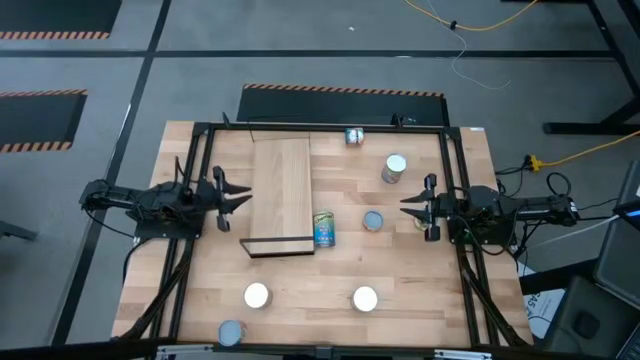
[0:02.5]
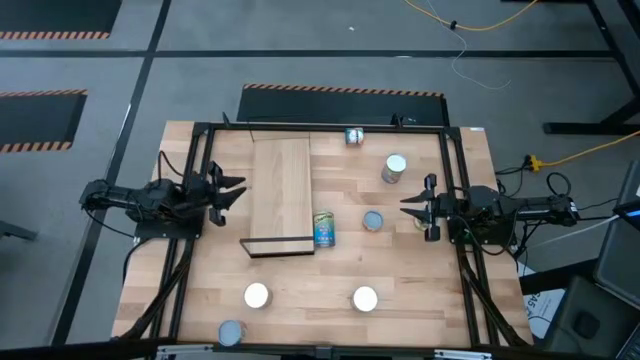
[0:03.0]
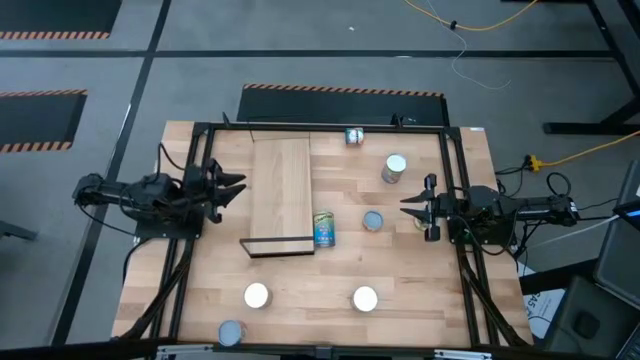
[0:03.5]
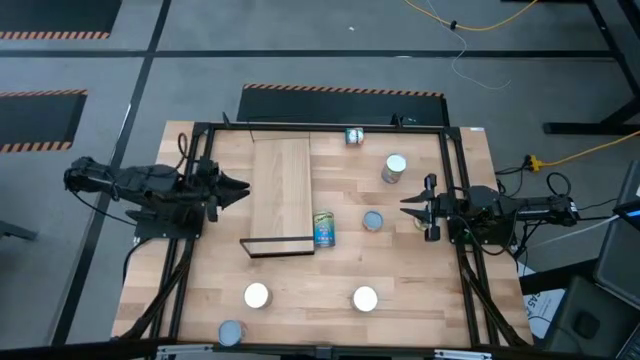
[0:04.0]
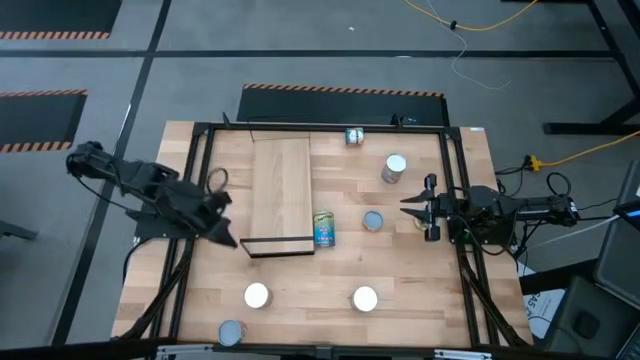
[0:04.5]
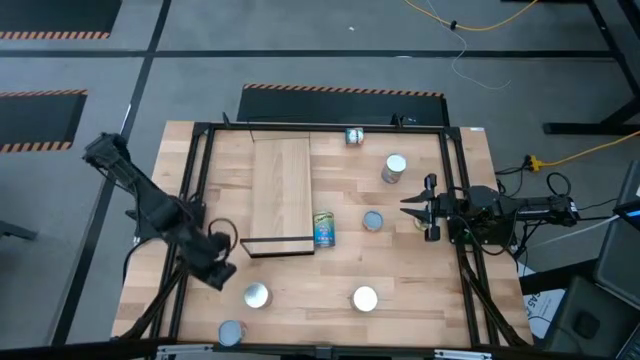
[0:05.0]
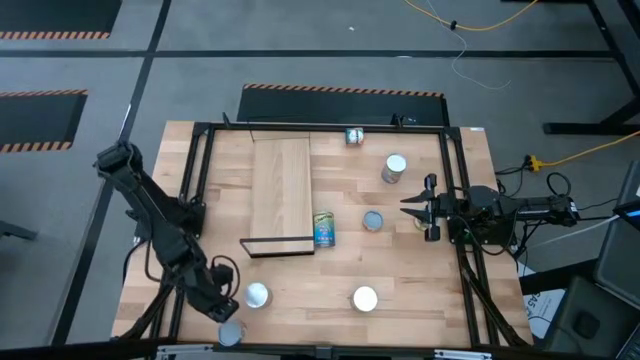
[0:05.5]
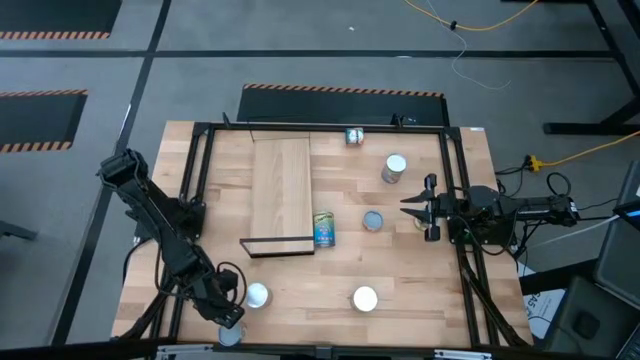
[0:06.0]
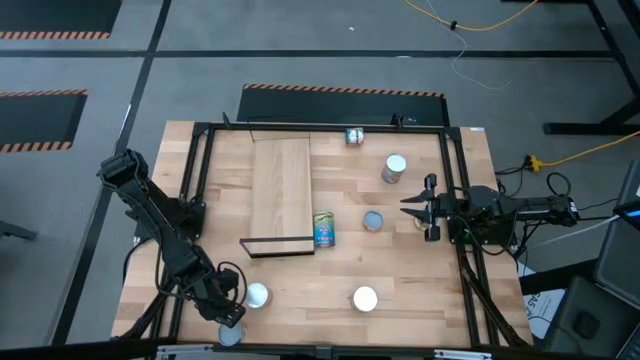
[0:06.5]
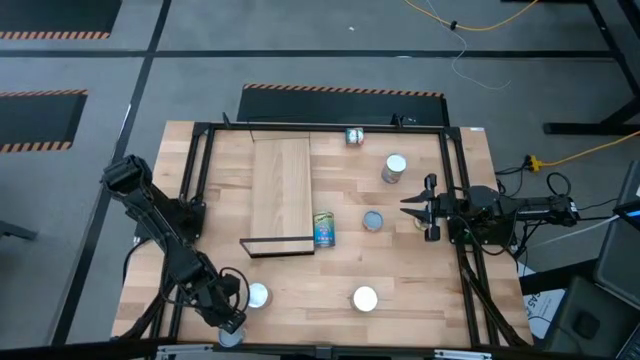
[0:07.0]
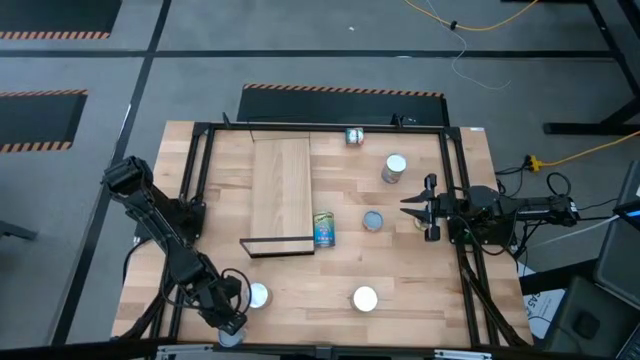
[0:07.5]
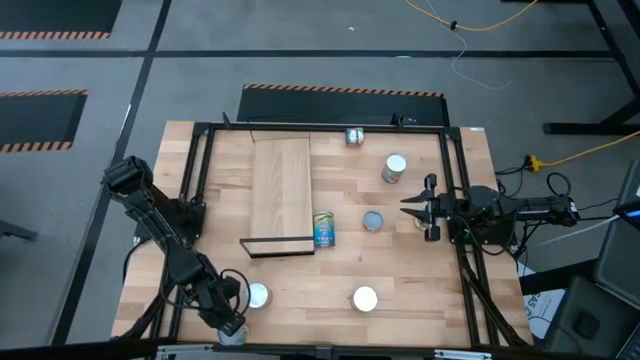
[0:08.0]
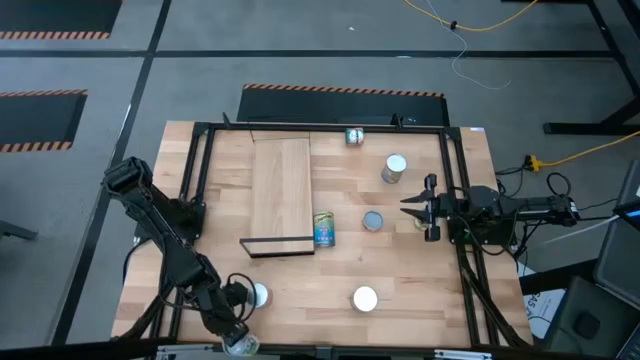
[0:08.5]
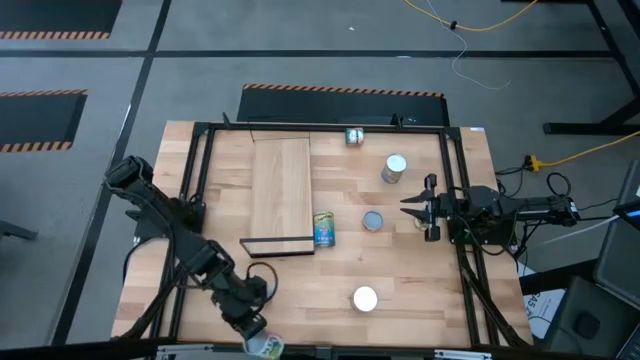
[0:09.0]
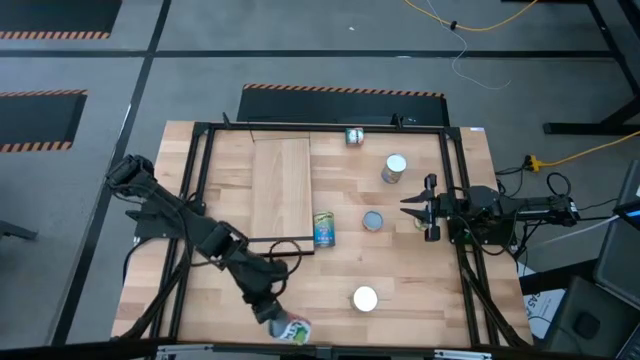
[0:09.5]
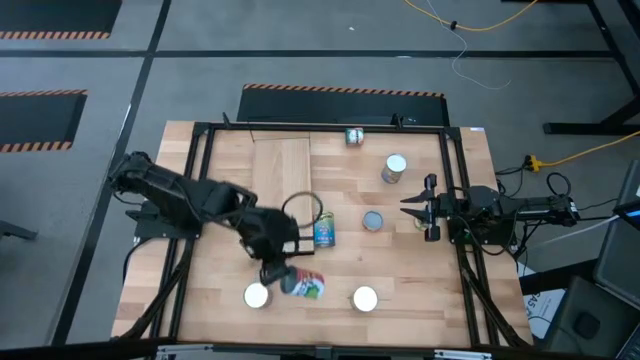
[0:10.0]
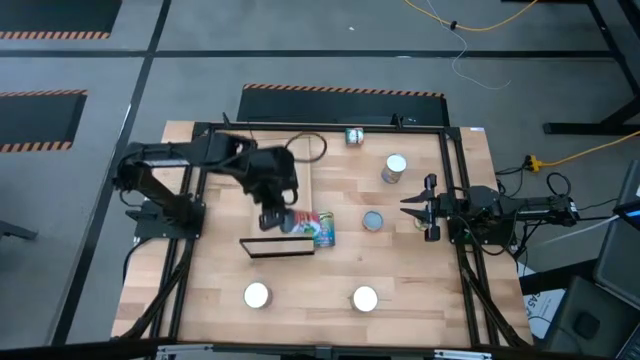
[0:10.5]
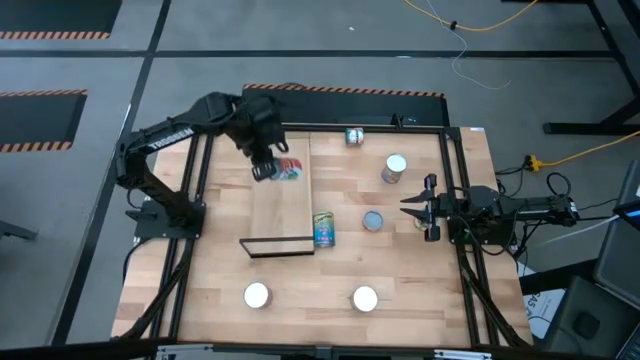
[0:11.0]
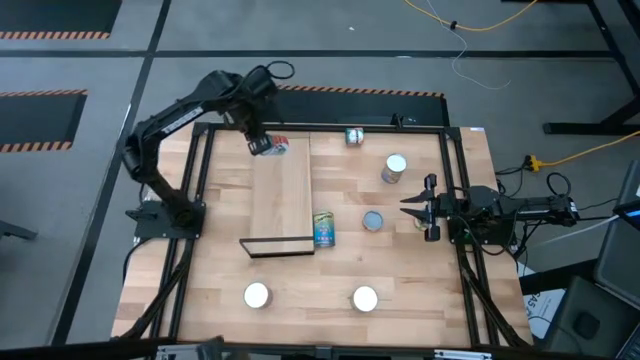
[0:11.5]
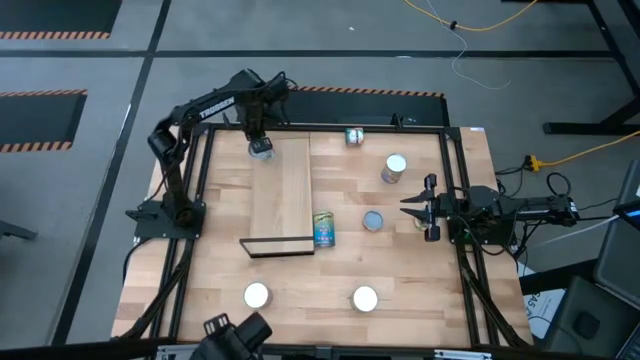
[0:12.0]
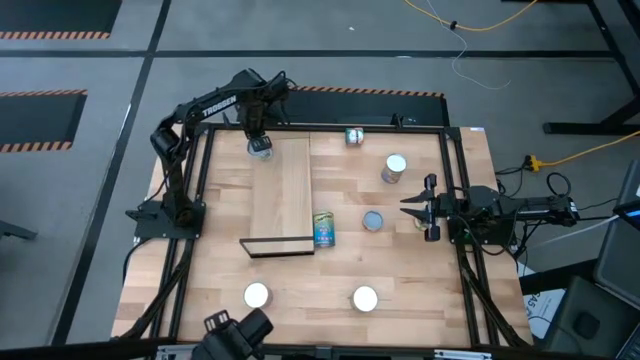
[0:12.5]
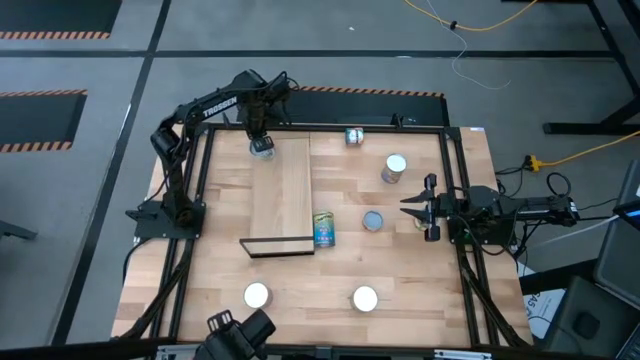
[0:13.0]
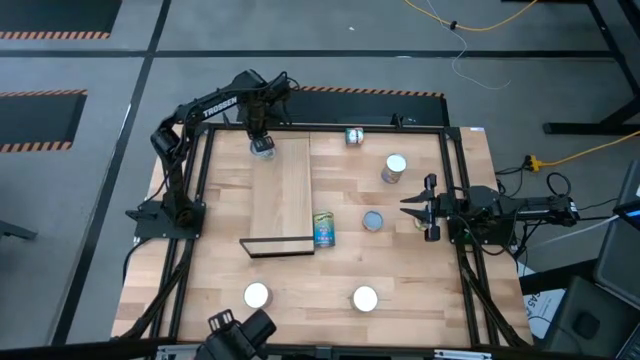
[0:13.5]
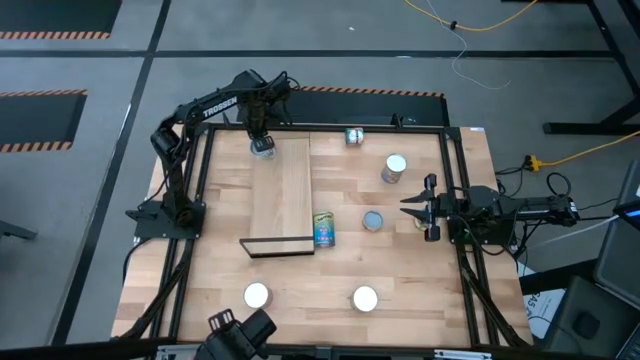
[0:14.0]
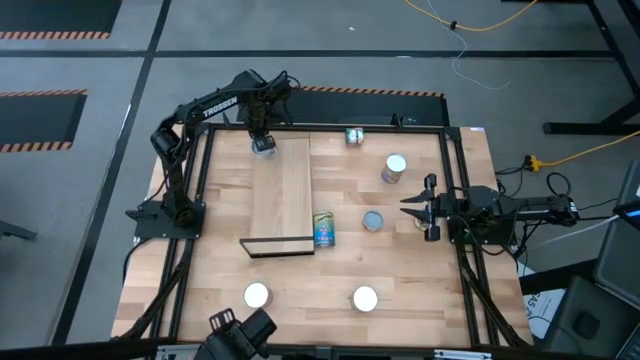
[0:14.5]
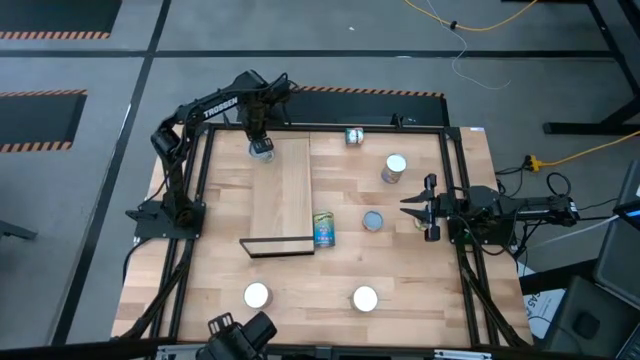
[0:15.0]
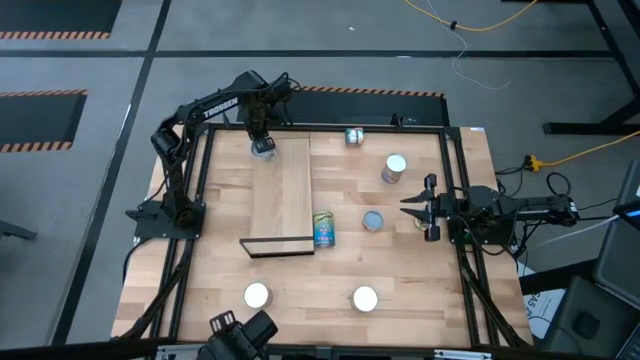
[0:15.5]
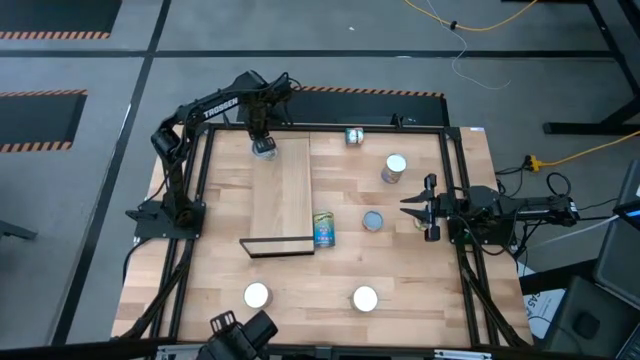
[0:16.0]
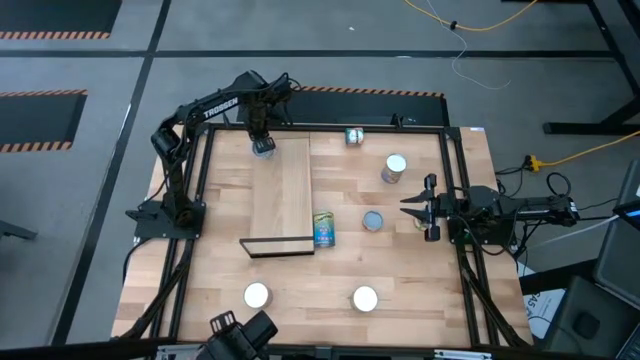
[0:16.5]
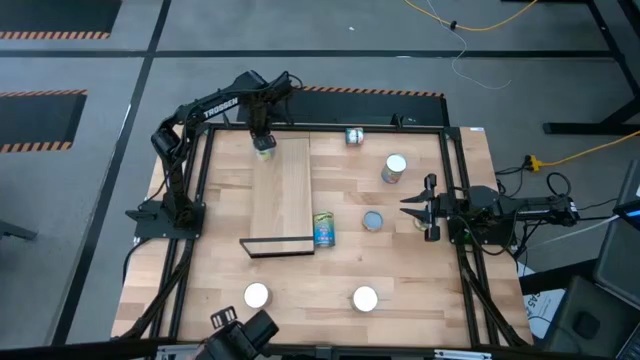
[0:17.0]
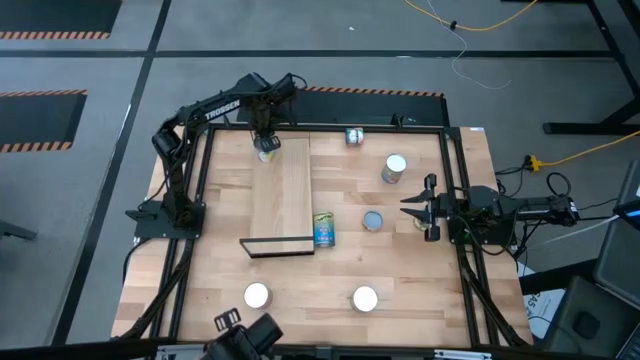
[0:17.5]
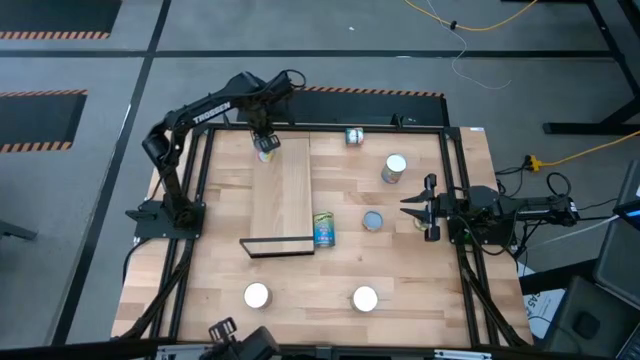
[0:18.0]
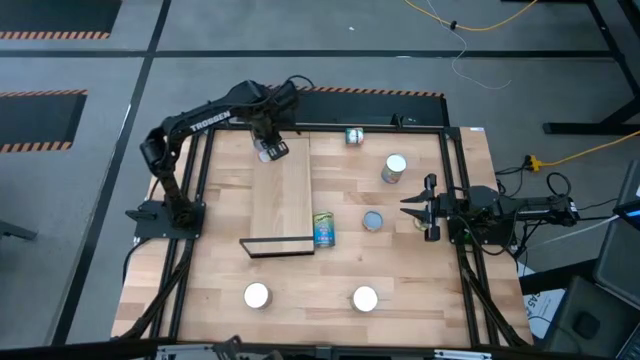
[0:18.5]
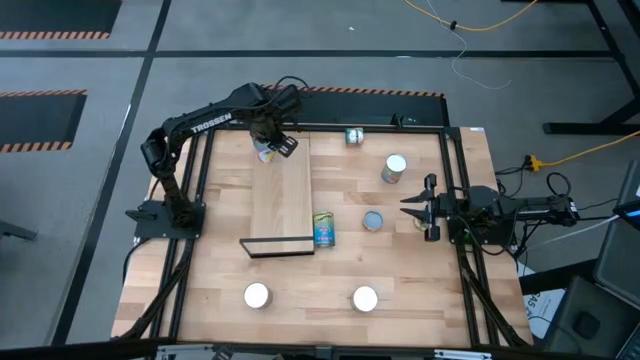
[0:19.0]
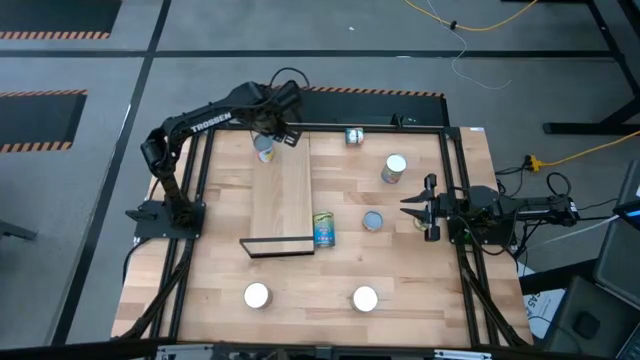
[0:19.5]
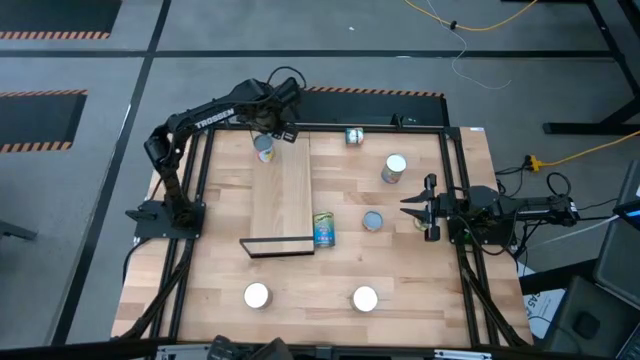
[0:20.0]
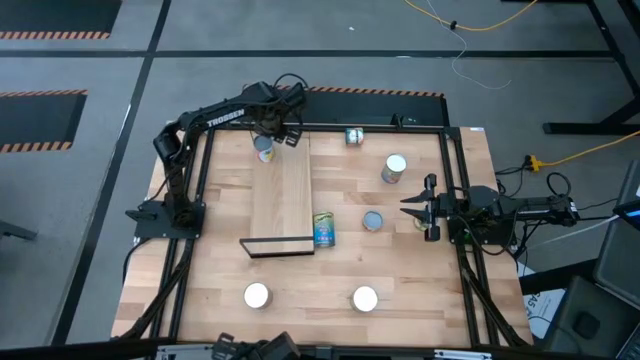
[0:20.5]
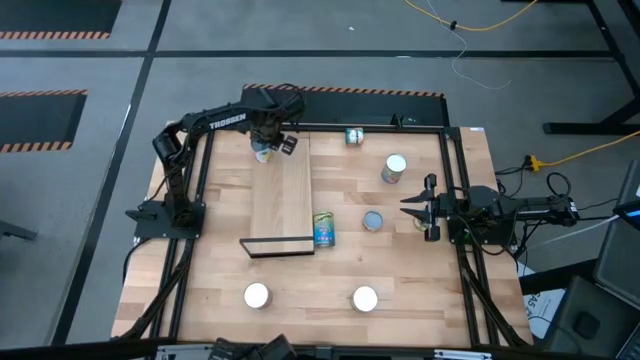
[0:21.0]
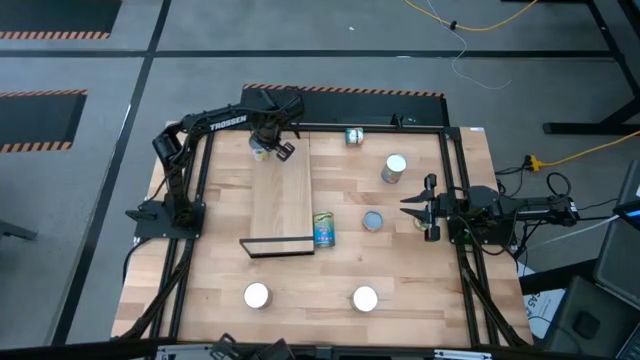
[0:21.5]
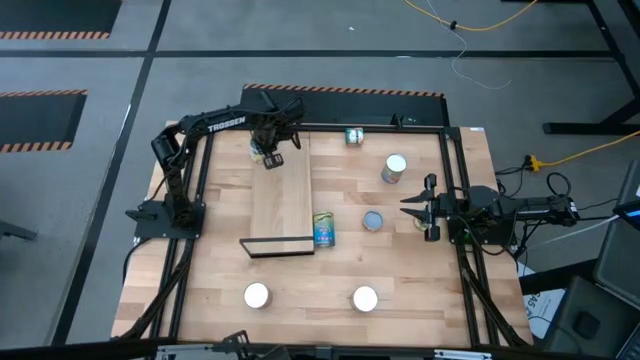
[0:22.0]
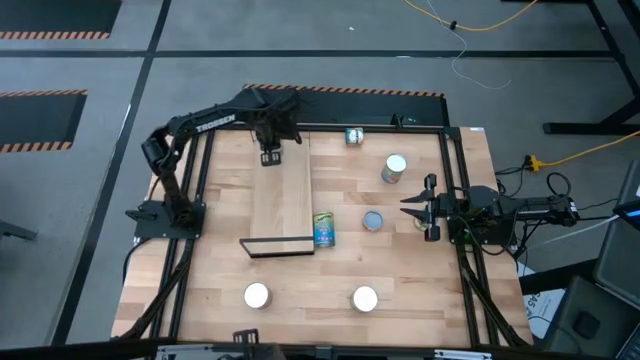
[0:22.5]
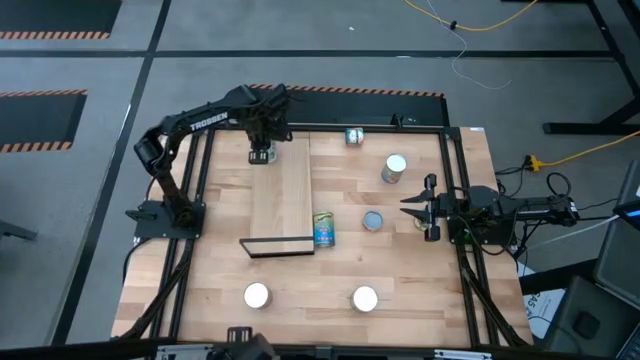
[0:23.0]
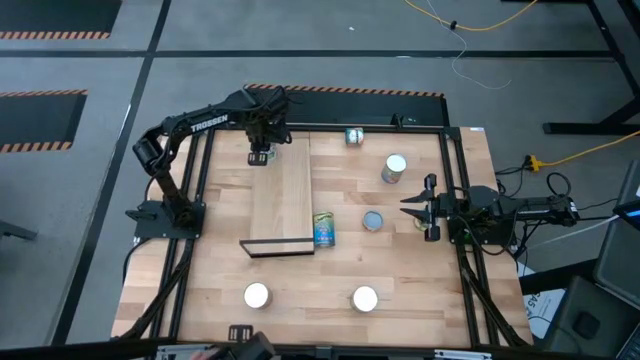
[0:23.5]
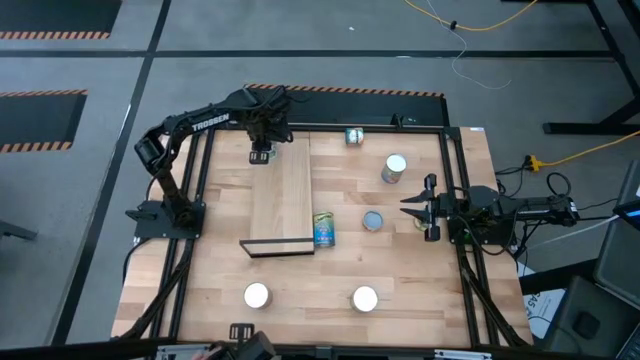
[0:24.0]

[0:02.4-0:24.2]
Task: Pick and place cans onto a shelf
Put the canned mix fruits on the shelf
